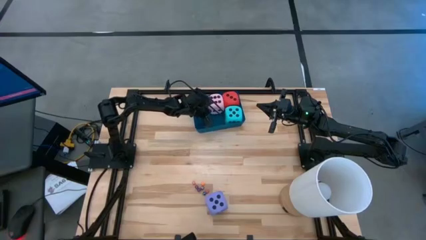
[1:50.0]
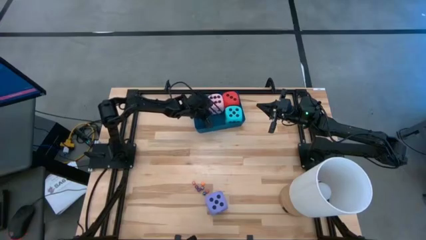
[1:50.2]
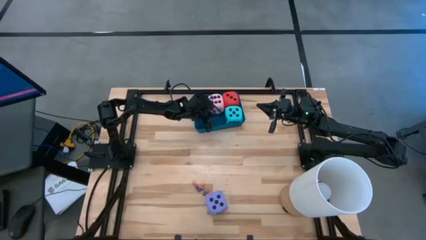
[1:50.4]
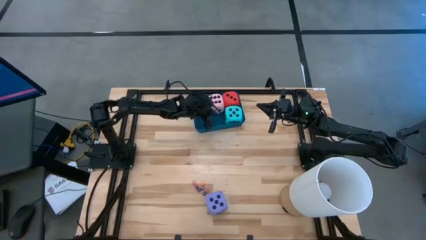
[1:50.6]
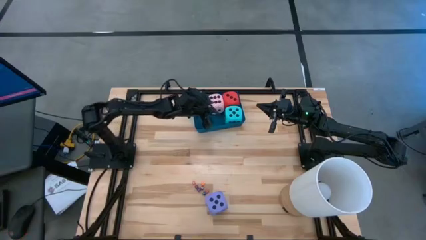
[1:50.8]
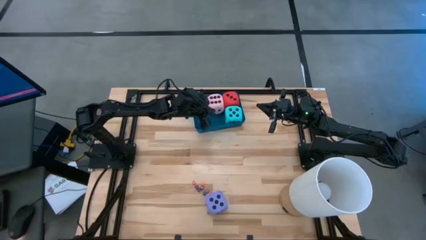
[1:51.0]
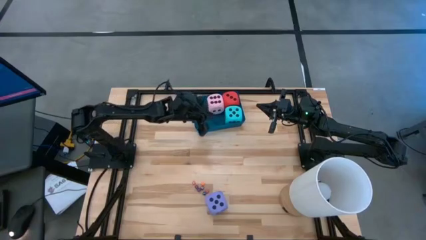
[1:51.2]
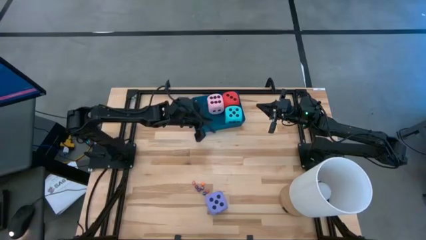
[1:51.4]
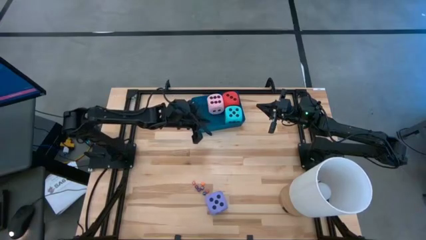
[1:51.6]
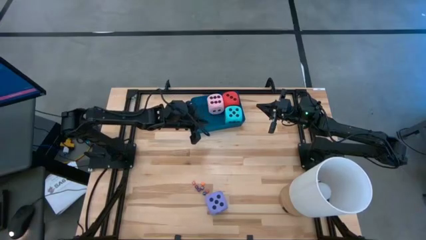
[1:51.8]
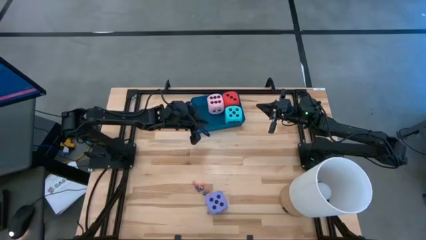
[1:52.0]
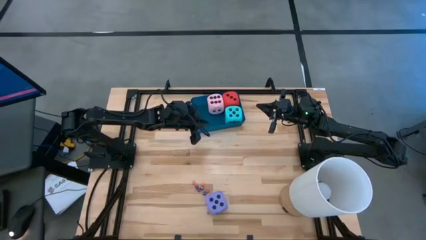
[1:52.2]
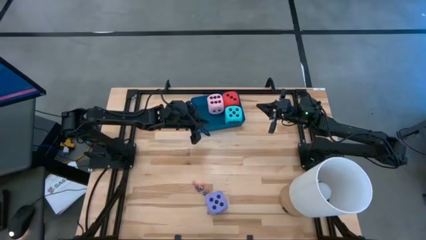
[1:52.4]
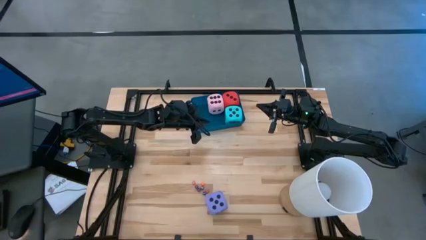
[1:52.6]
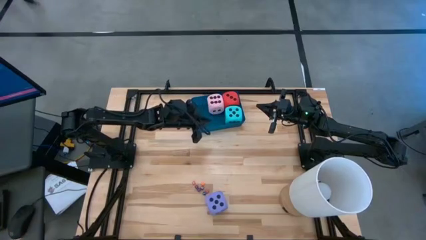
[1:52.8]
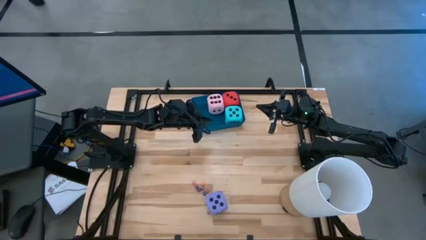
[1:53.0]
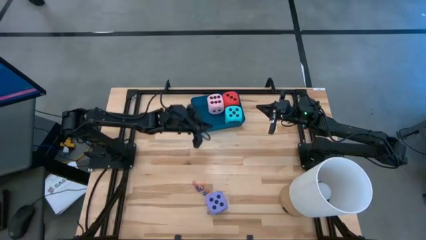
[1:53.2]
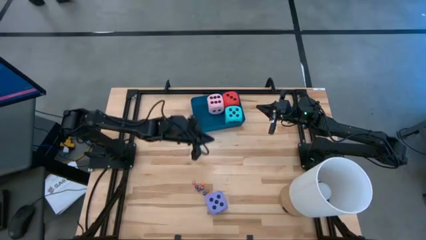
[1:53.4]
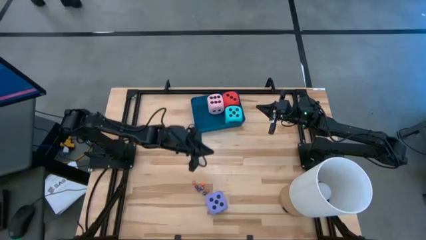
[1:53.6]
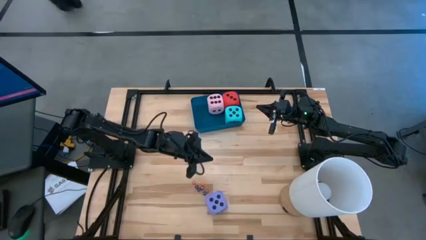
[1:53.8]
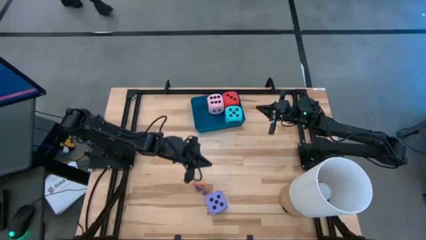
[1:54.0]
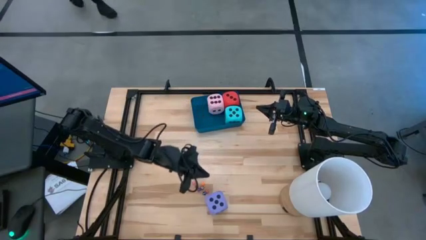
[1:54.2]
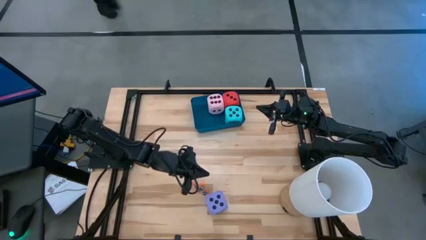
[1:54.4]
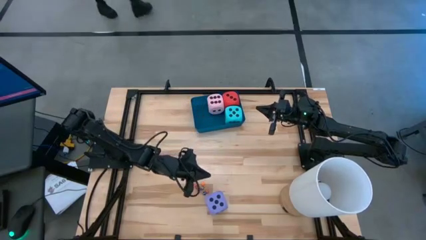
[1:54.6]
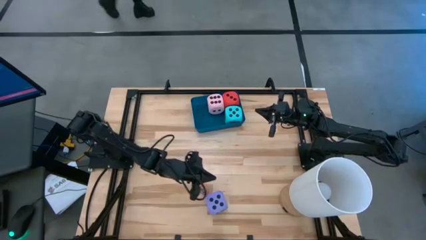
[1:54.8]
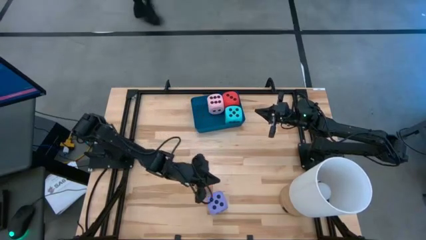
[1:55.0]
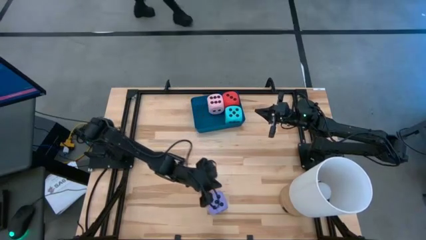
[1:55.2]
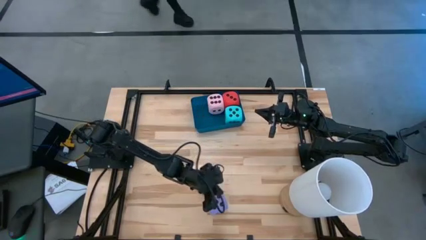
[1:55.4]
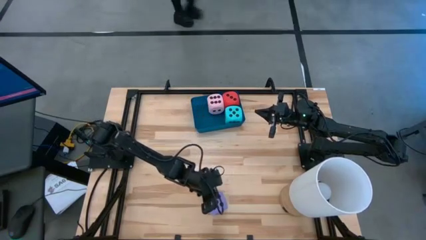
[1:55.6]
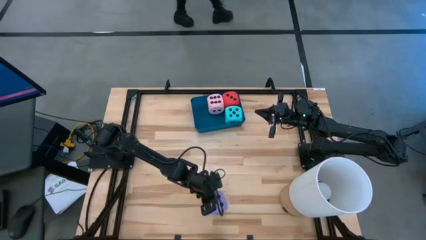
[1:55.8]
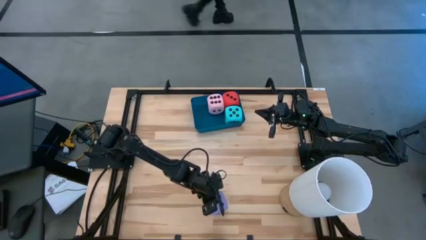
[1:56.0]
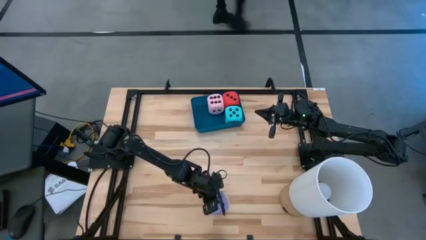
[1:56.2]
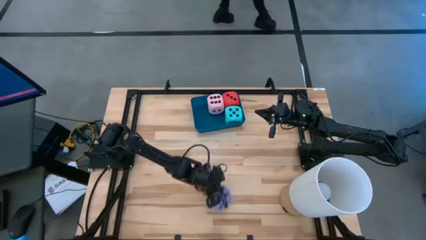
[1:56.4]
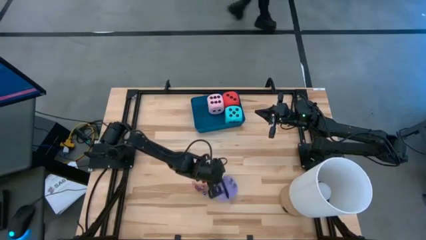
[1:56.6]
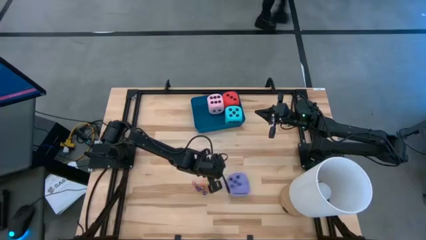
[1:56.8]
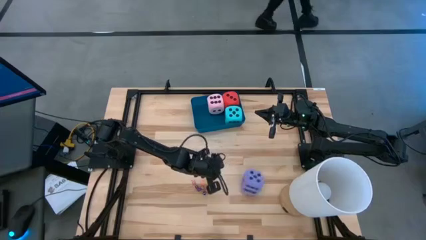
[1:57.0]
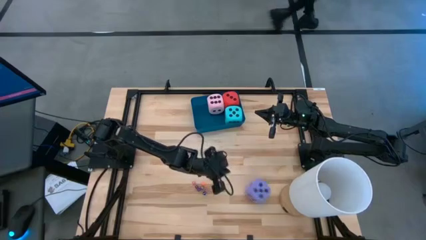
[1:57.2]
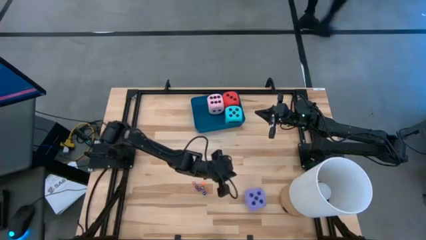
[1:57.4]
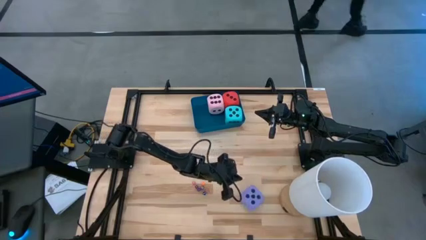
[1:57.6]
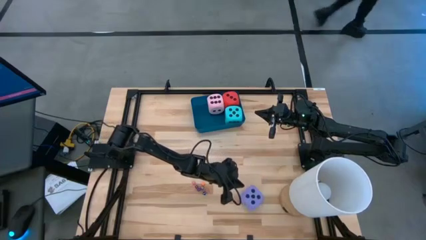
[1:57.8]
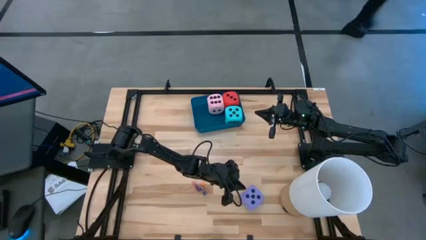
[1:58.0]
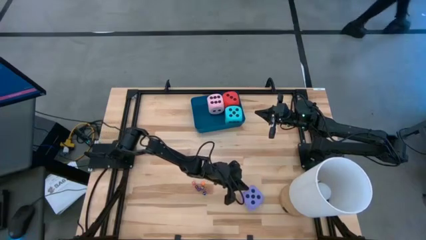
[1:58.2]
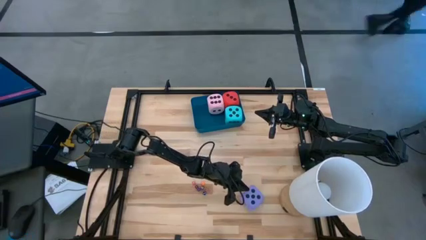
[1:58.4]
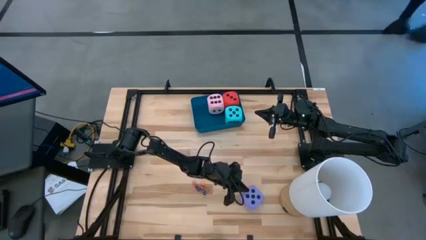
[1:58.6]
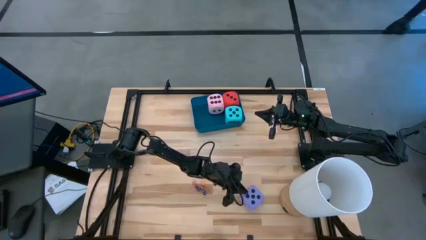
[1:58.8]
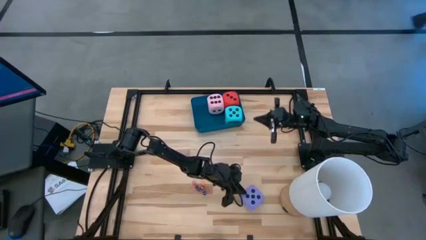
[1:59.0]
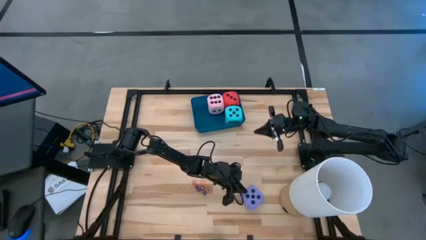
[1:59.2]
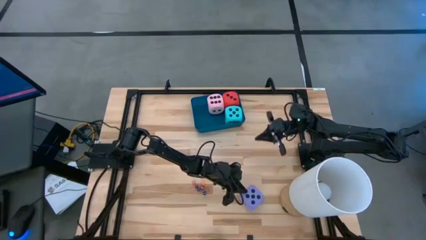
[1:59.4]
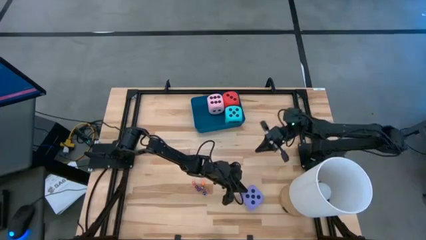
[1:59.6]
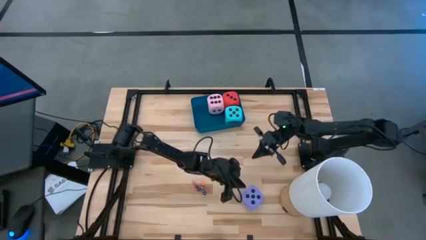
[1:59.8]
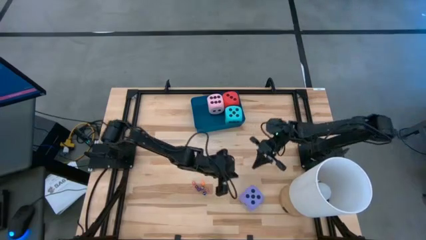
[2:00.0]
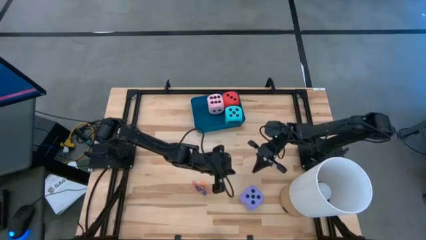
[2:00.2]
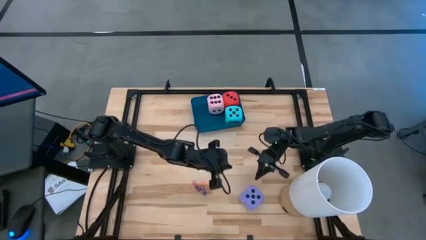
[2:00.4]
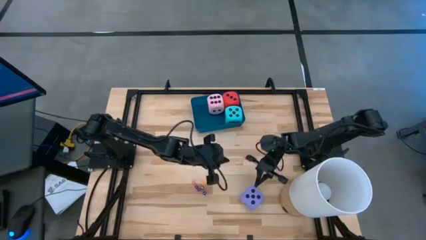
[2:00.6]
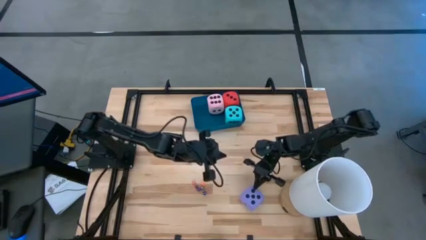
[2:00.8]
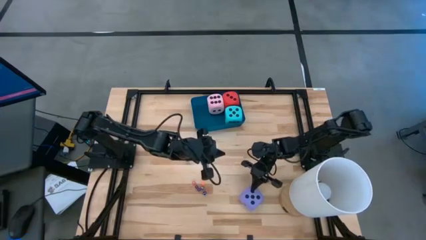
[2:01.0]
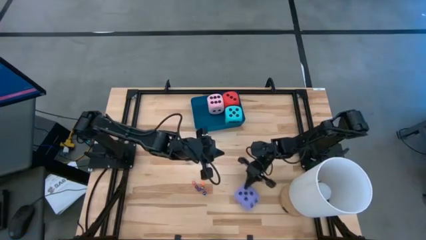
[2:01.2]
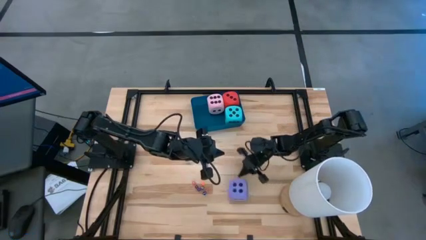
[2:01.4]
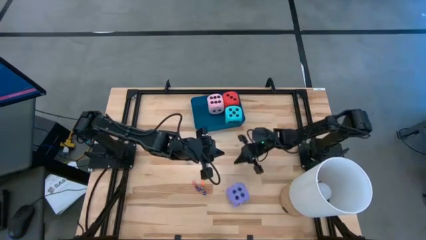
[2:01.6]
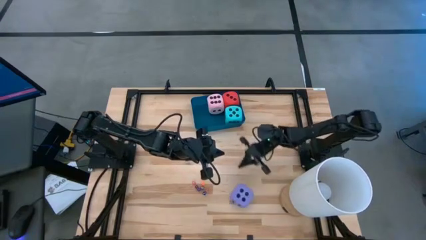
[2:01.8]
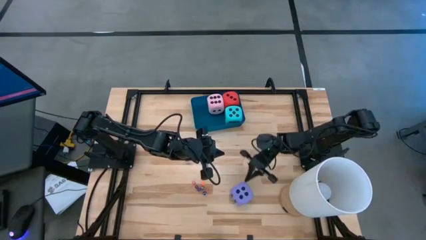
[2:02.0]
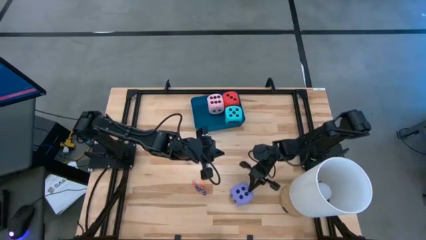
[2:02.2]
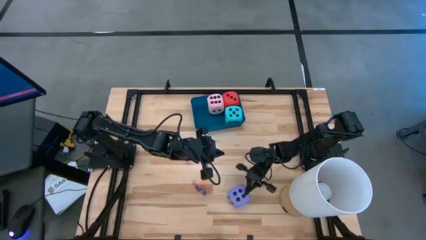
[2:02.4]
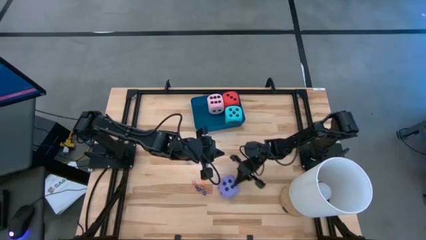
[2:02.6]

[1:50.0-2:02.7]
Task: Pick & Place Dice
Put the large purple dice into the blue bin
